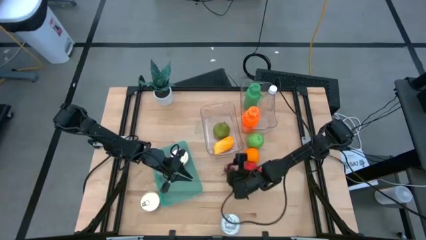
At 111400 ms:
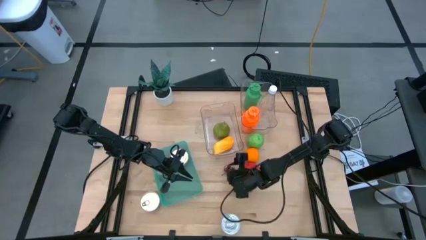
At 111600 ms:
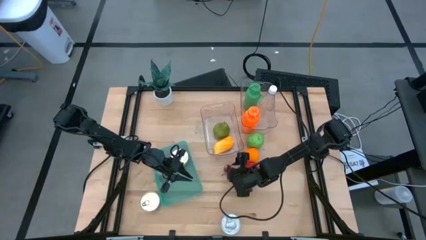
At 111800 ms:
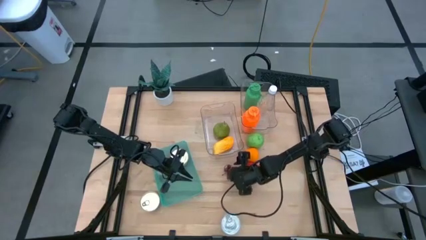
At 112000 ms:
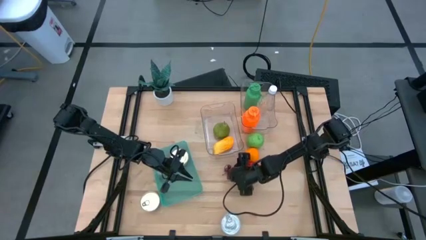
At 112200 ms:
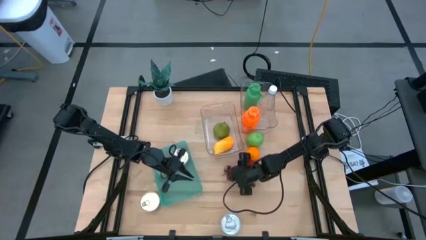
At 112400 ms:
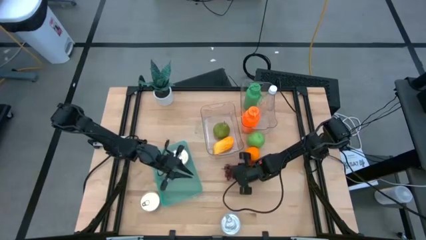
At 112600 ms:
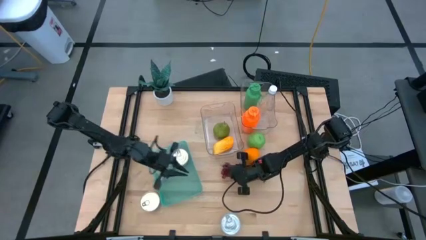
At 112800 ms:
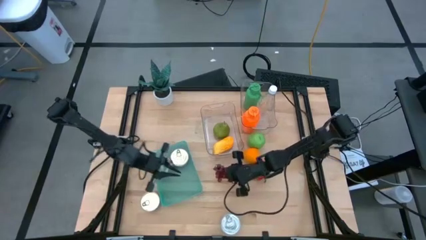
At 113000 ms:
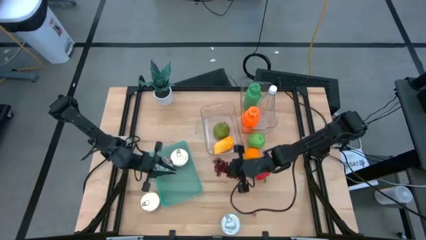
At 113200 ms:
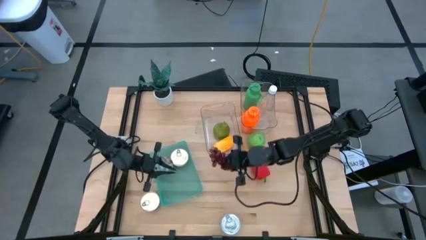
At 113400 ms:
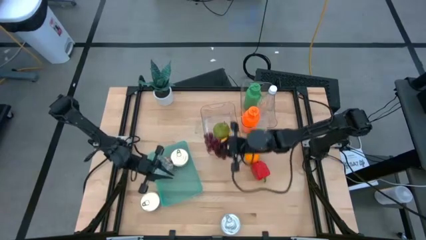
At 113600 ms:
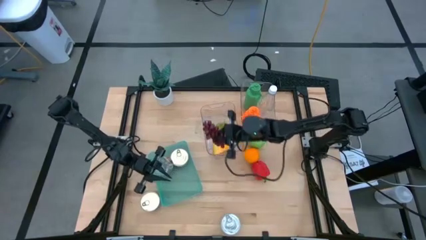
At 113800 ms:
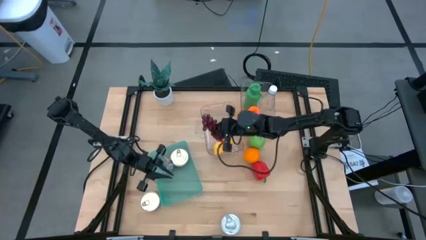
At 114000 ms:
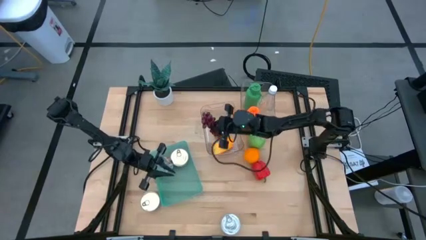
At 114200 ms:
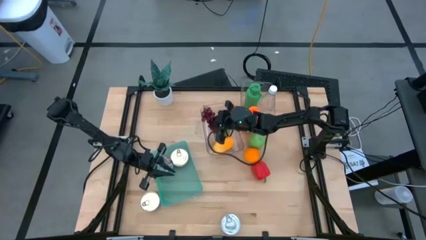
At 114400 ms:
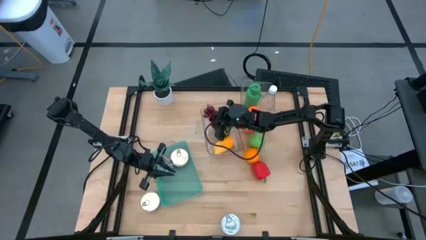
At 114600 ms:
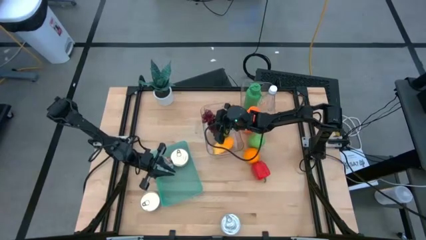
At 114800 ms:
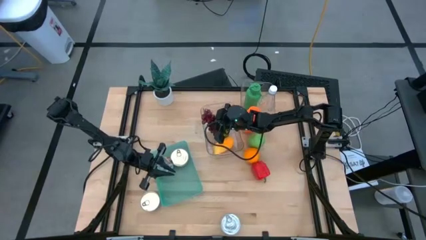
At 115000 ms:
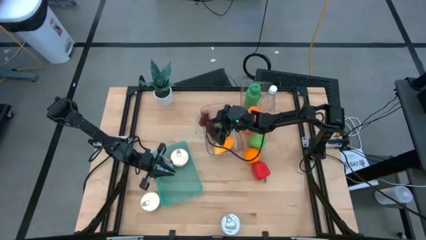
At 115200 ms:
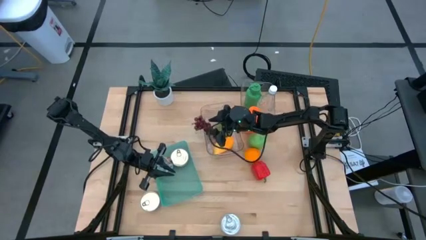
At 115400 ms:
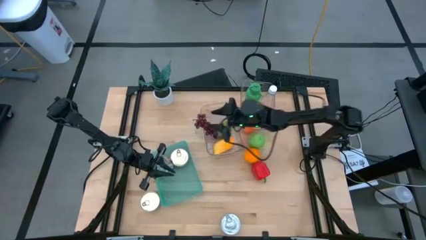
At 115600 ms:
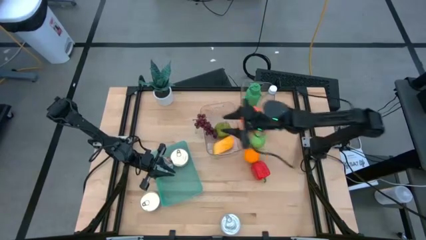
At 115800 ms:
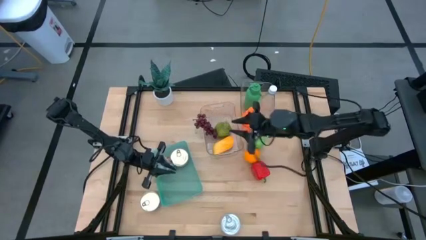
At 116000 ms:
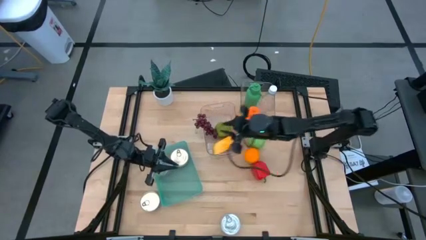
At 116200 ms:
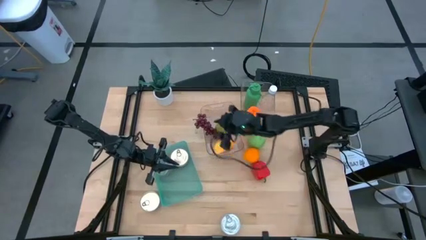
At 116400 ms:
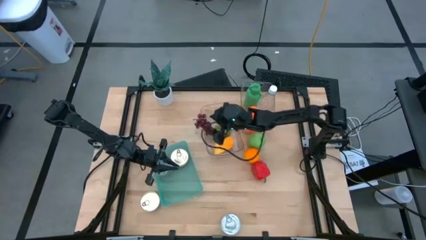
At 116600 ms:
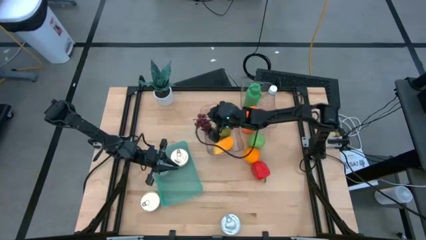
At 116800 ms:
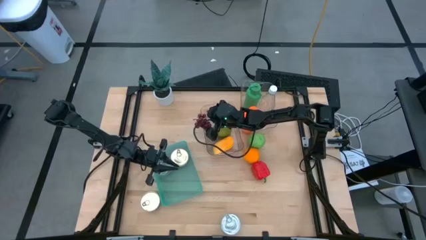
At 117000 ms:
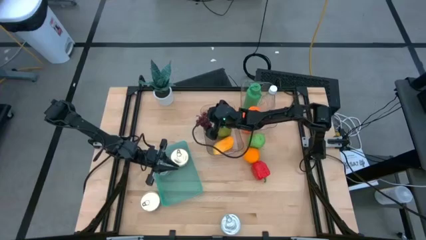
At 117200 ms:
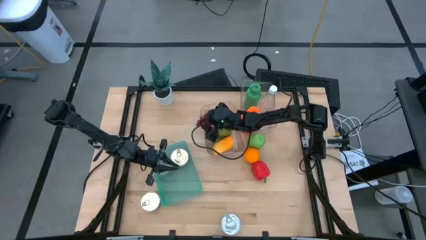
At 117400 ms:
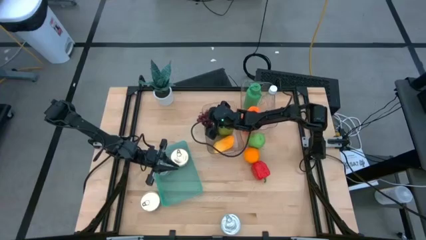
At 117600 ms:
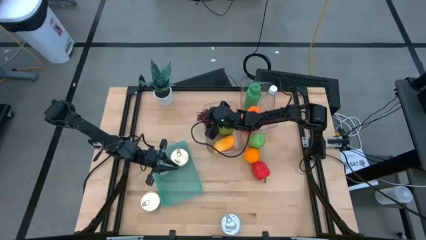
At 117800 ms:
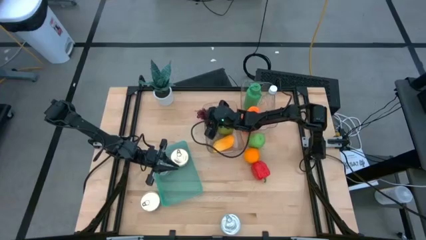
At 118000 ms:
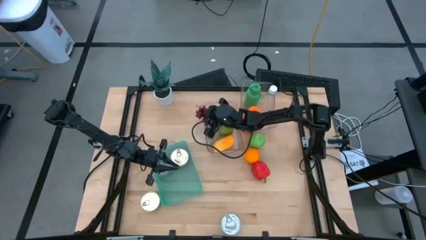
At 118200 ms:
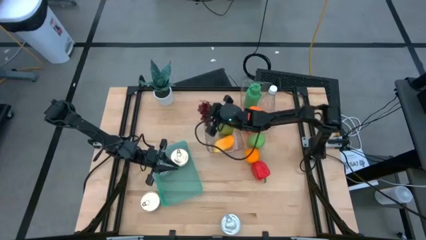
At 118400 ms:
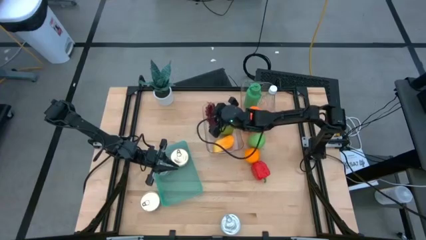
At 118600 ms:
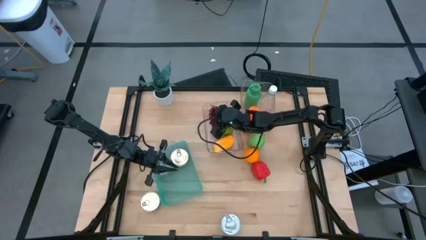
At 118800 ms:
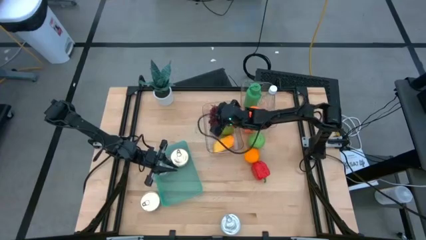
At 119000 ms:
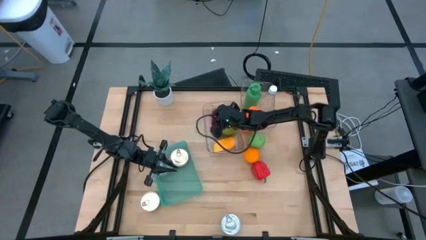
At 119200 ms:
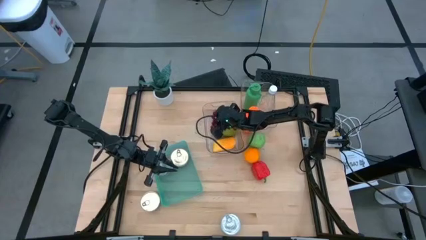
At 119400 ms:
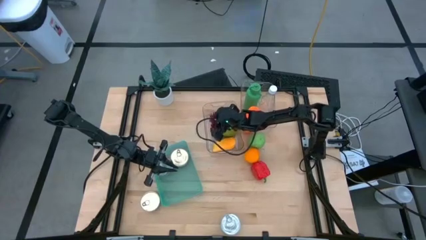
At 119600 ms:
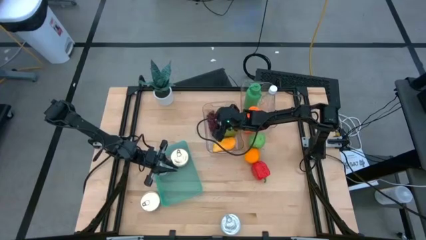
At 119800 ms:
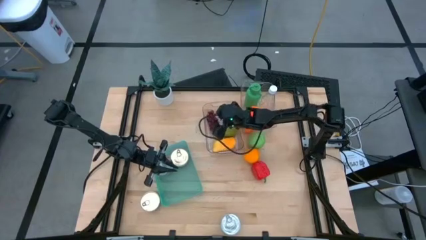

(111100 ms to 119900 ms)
Task: Pick & Place Food Item
Put the red grapes into the bottom transparent bin

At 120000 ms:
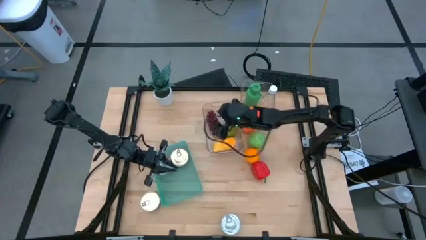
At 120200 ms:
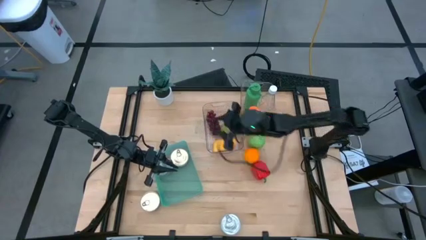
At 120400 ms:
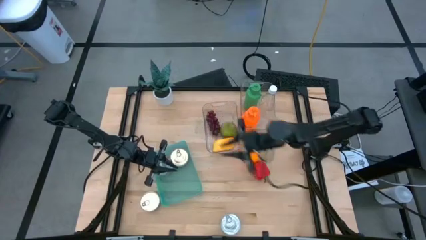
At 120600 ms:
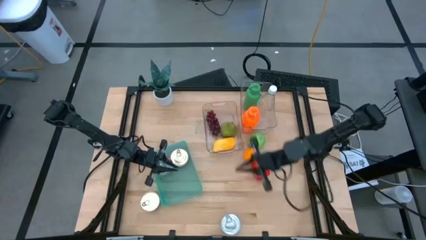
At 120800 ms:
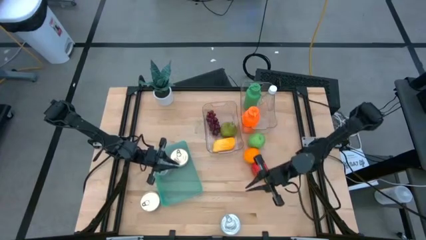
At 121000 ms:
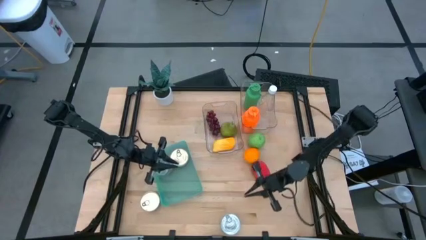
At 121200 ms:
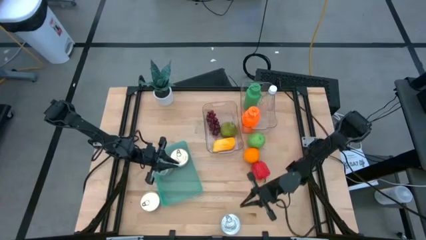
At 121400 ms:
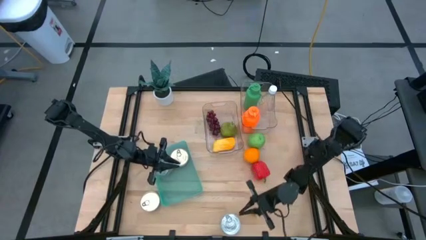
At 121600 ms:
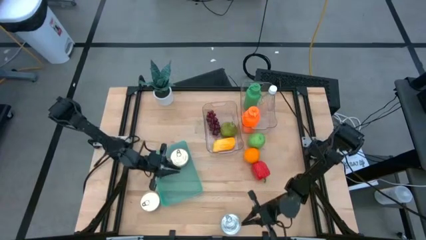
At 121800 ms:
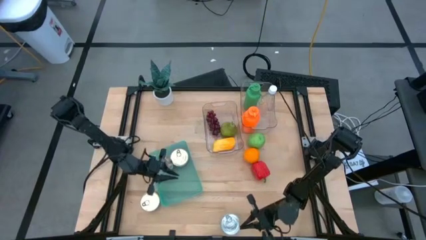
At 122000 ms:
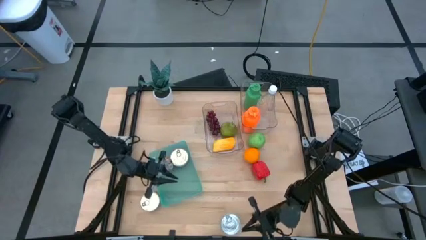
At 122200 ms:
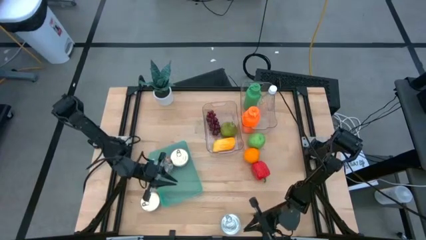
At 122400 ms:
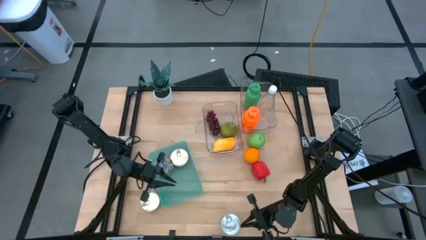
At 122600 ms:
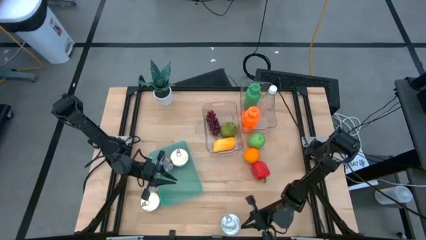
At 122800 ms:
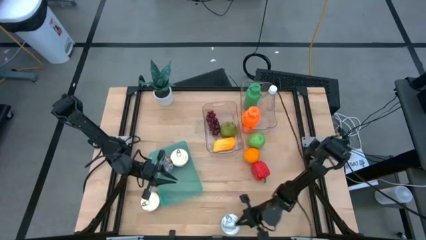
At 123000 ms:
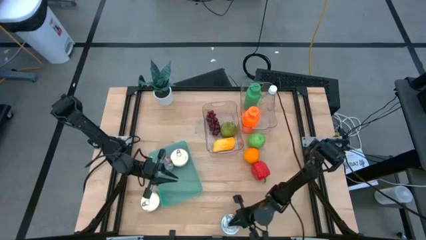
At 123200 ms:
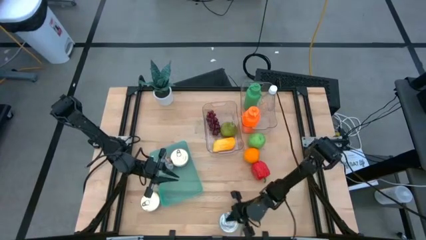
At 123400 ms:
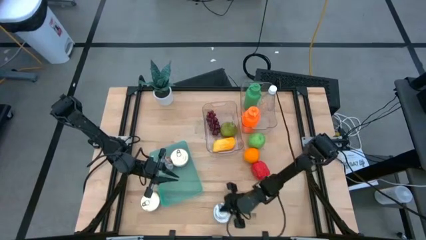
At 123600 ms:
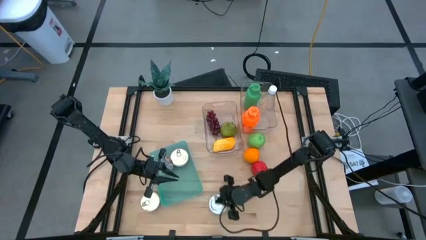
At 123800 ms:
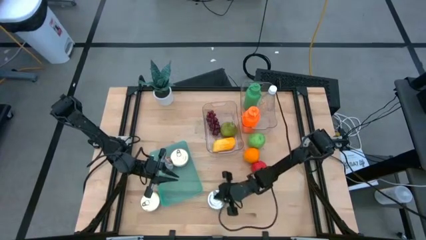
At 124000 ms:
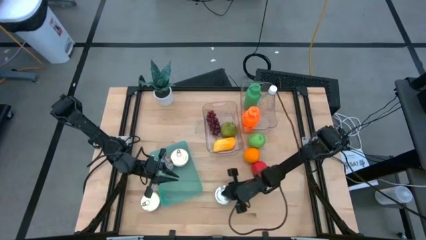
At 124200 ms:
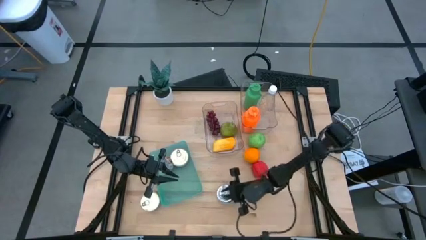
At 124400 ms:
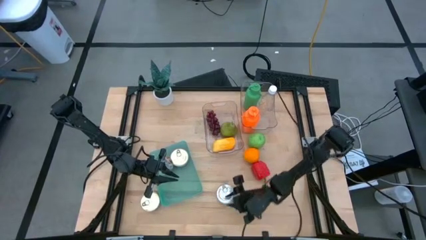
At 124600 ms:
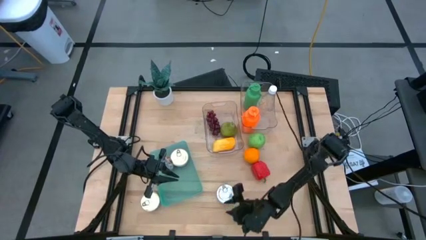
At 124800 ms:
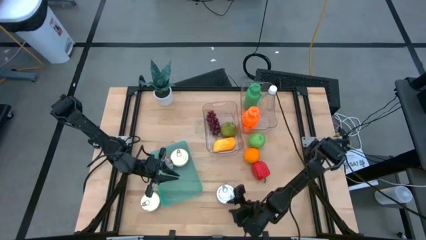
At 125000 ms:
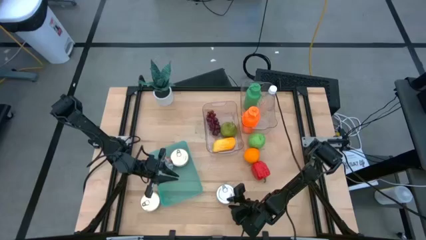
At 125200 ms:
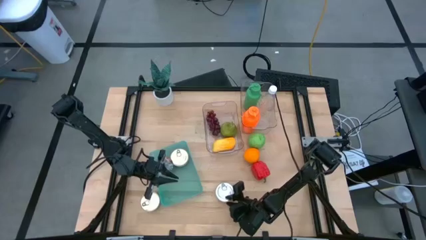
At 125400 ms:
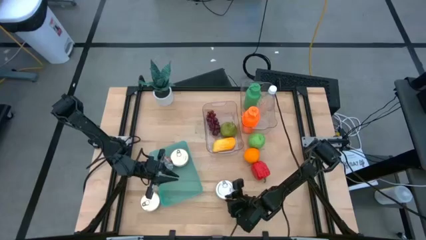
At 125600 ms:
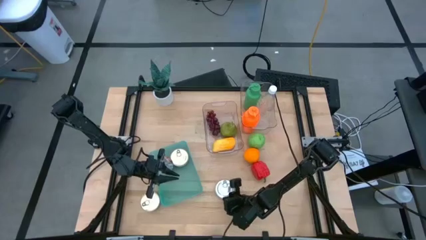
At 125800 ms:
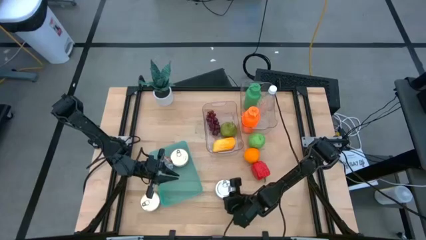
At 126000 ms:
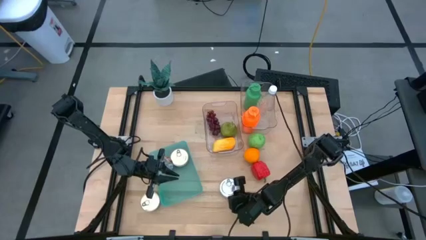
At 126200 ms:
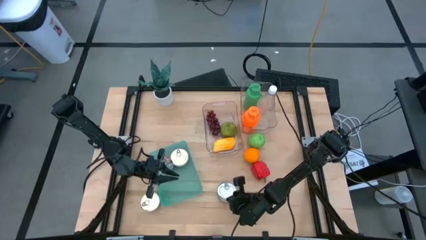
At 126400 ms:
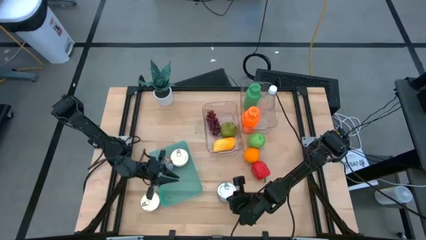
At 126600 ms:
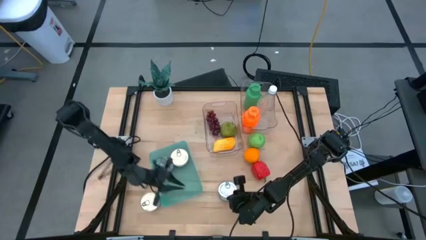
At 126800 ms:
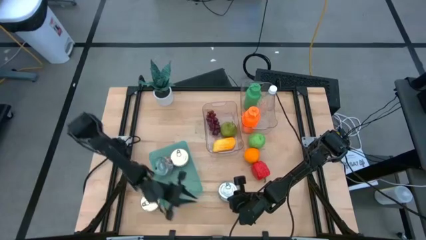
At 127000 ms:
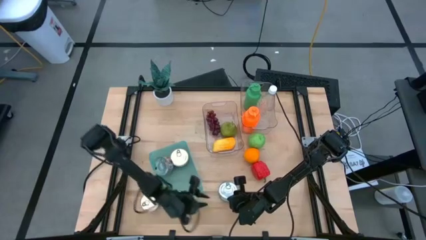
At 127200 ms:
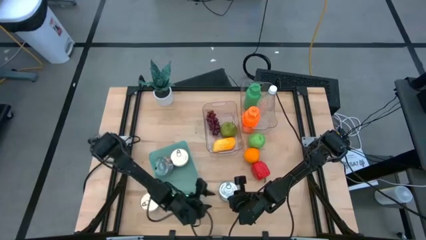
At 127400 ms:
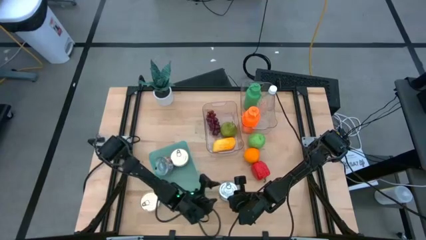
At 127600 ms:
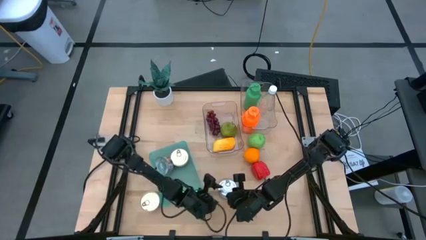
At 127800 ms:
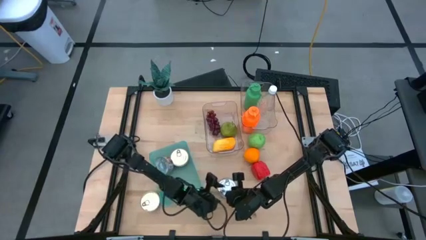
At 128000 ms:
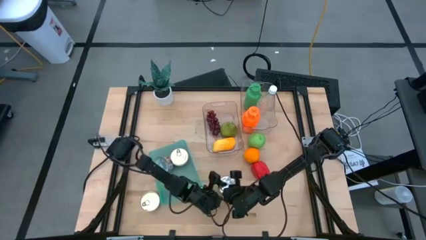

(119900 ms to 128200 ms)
Put the green tuna can into the green bin
